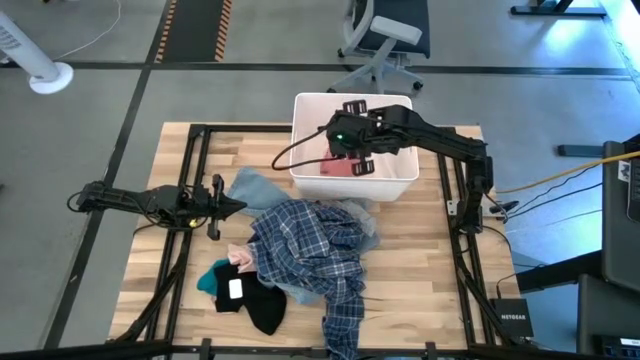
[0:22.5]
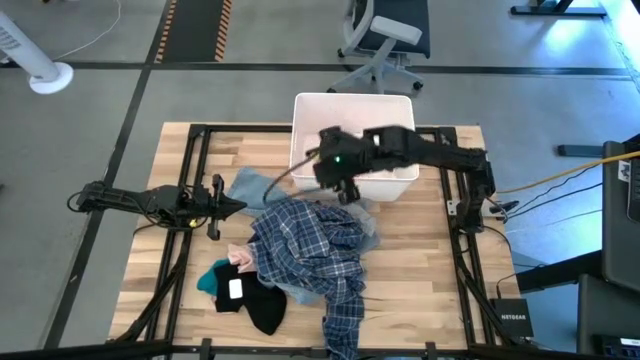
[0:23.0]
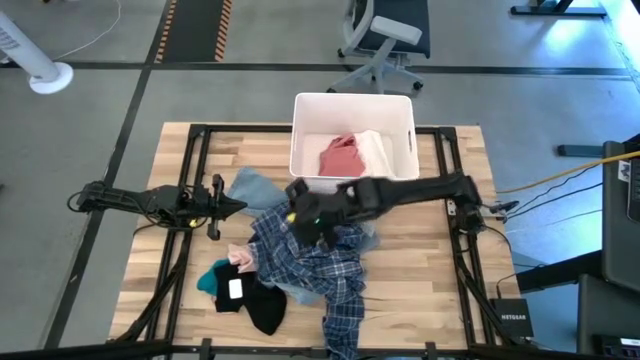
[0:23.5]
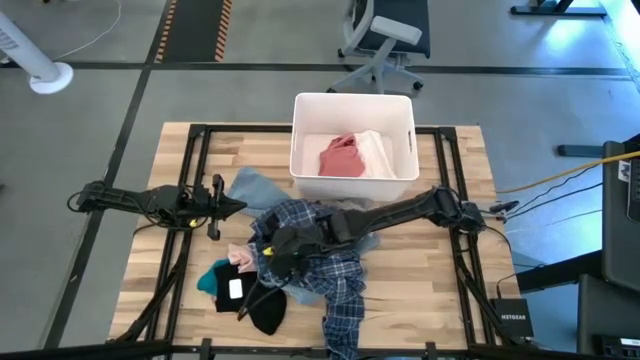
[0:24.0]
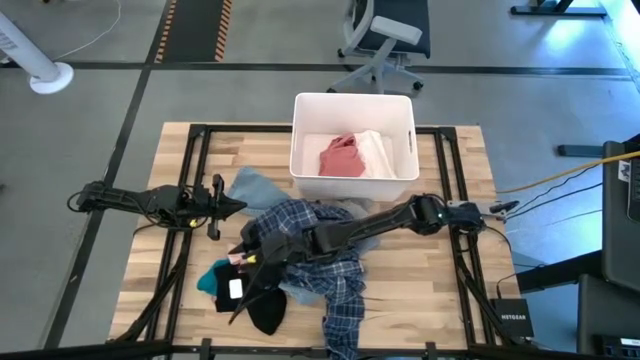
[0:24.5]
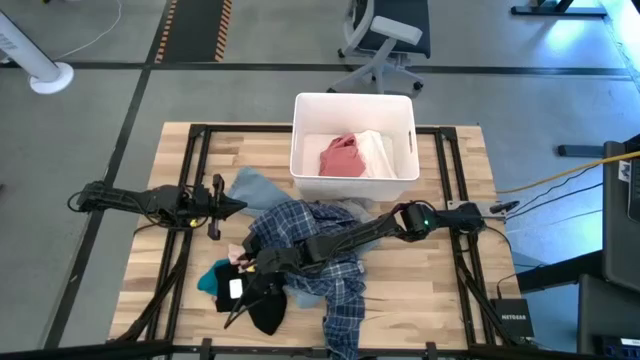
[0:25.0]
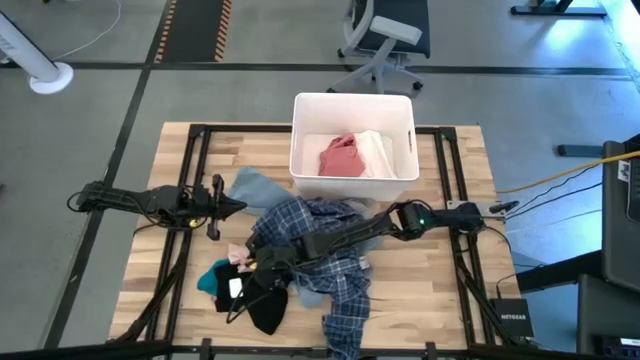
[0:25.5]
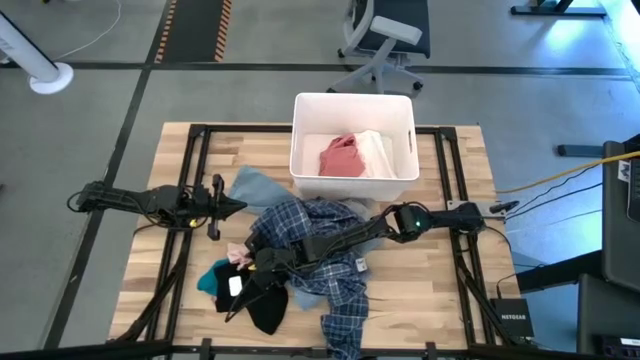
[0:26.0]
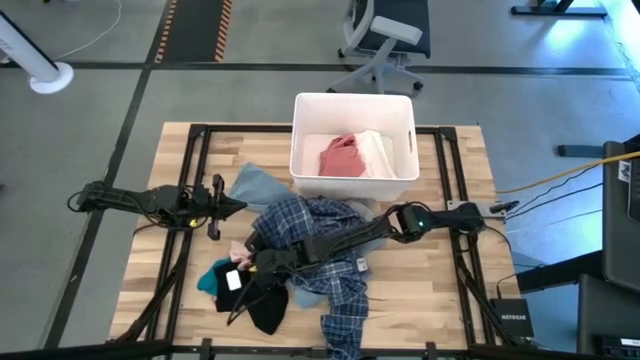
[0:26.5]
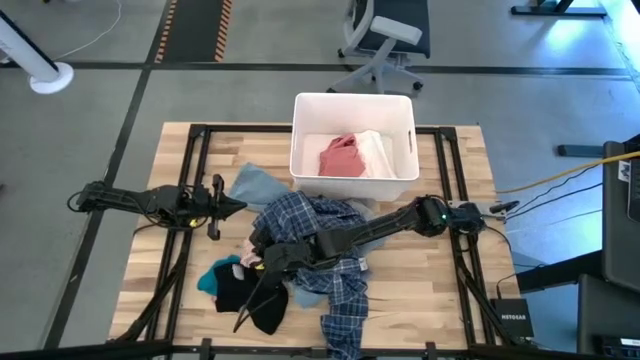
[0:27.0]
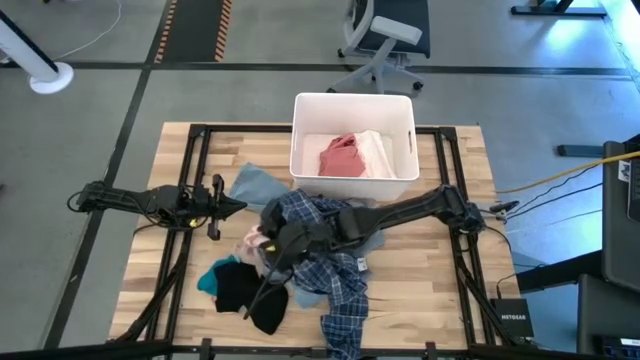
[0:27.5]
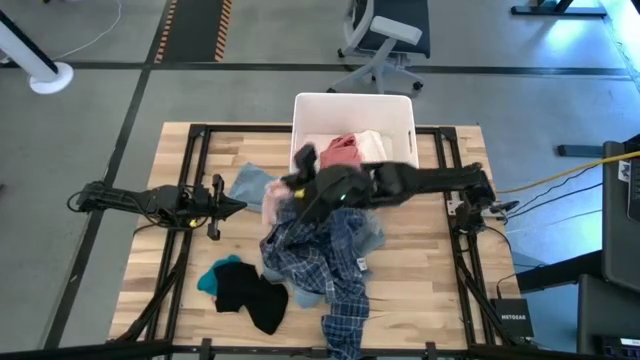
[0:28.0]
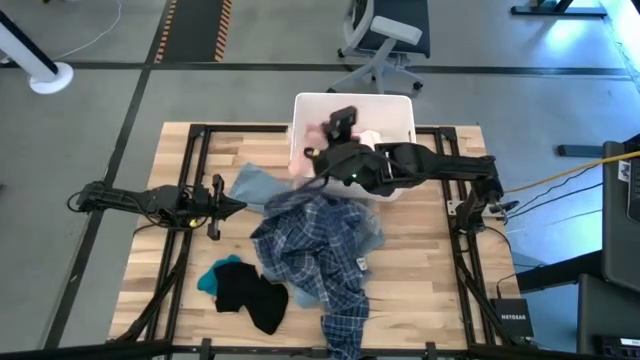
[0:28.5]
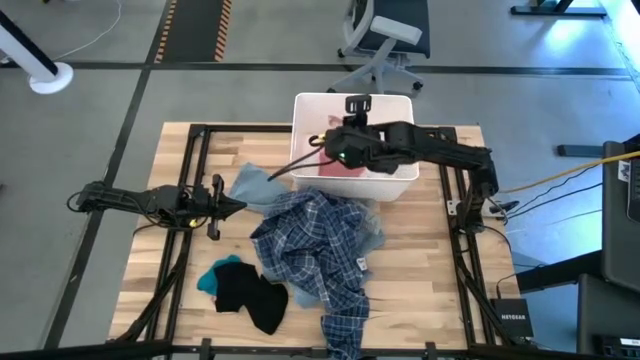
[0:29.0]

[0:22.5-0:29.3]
Task: Sort clothes
Put the light pink sock into the white laundry bin

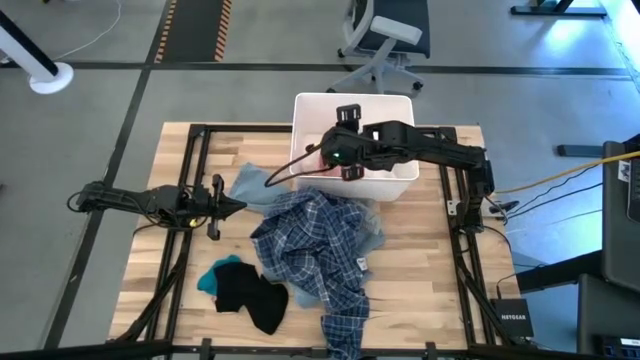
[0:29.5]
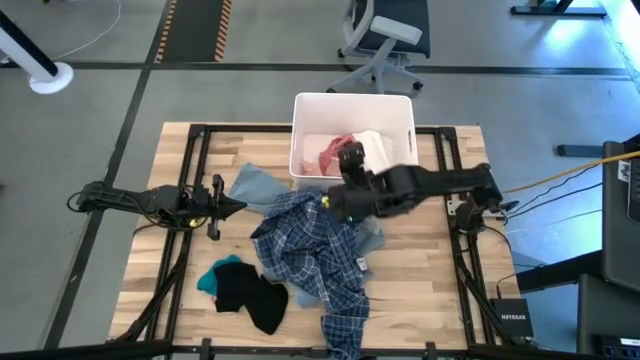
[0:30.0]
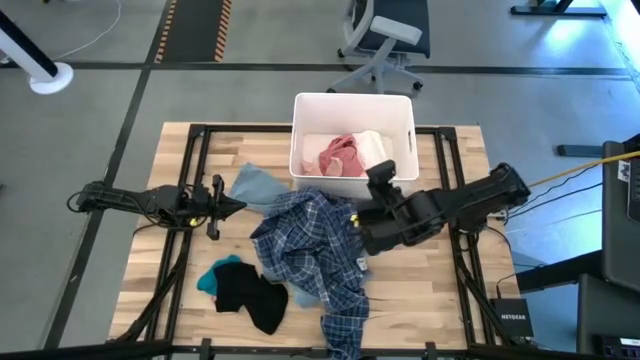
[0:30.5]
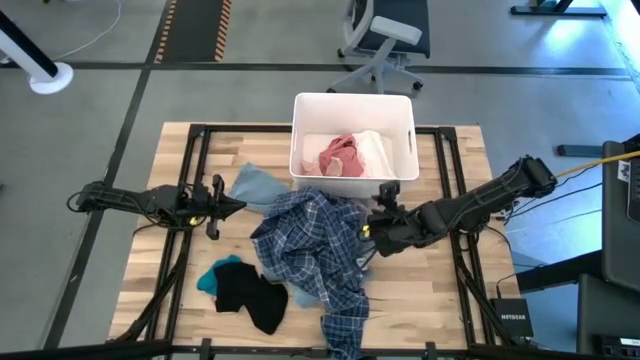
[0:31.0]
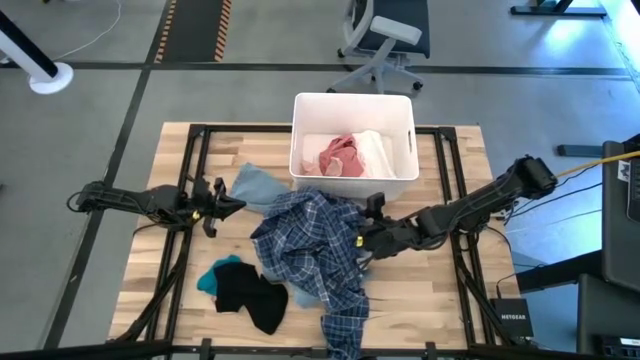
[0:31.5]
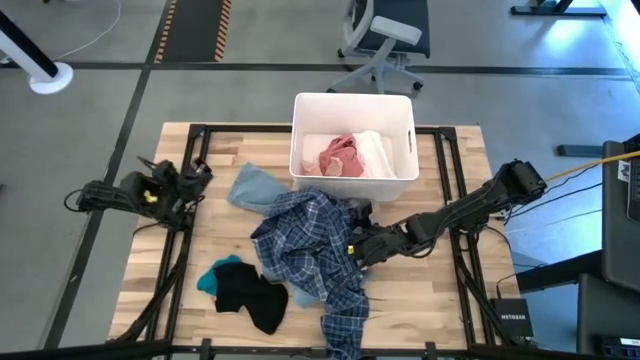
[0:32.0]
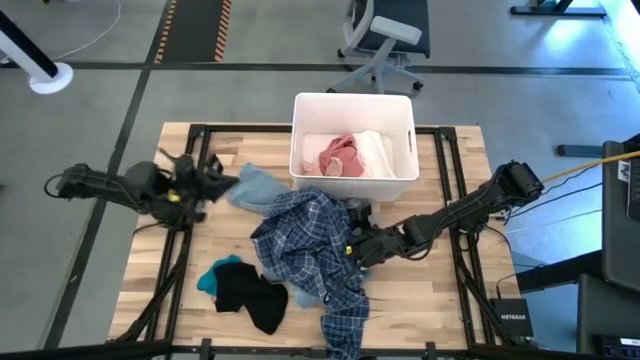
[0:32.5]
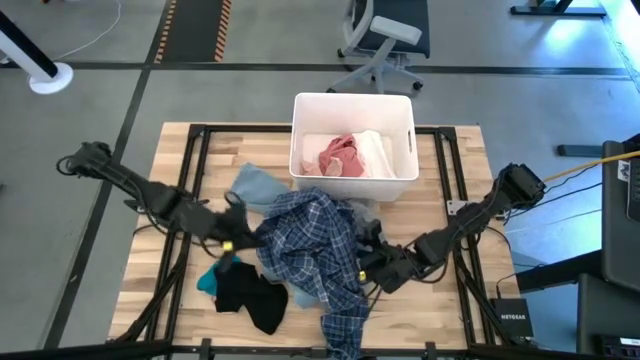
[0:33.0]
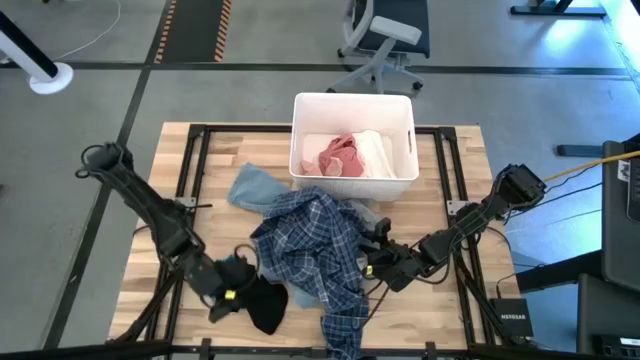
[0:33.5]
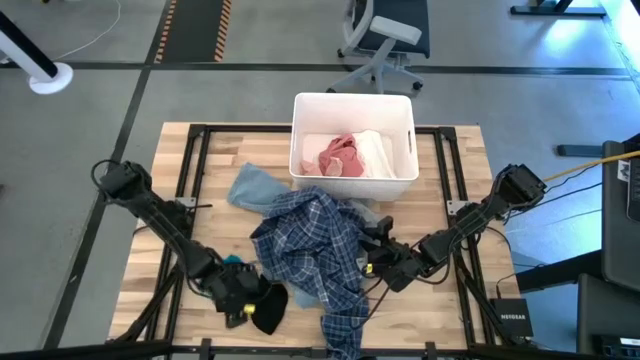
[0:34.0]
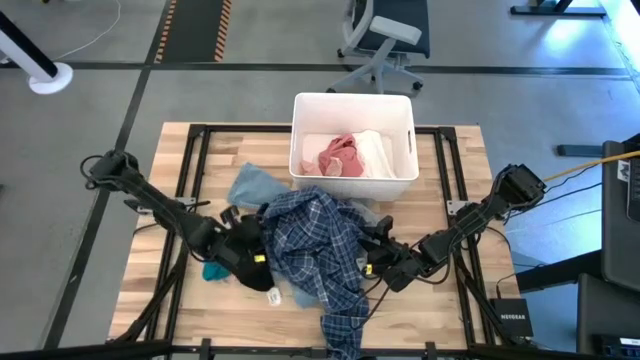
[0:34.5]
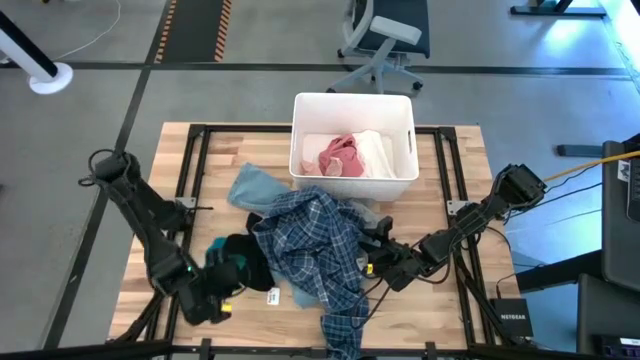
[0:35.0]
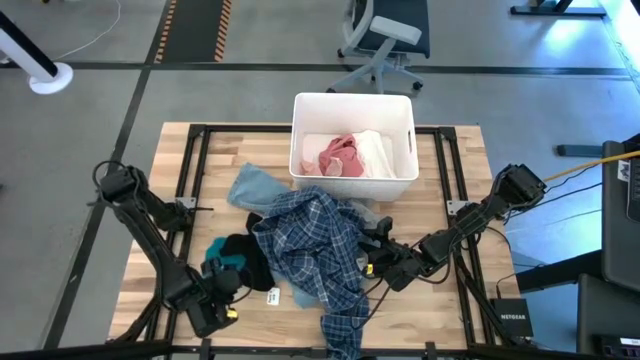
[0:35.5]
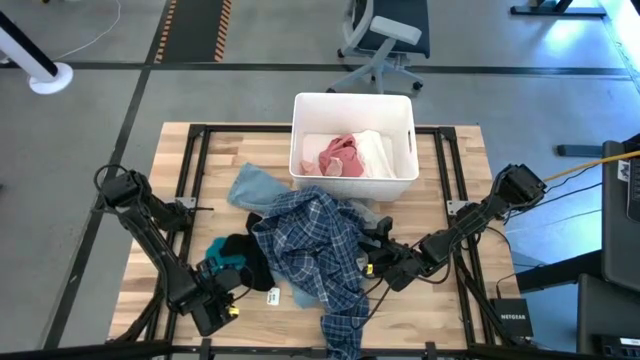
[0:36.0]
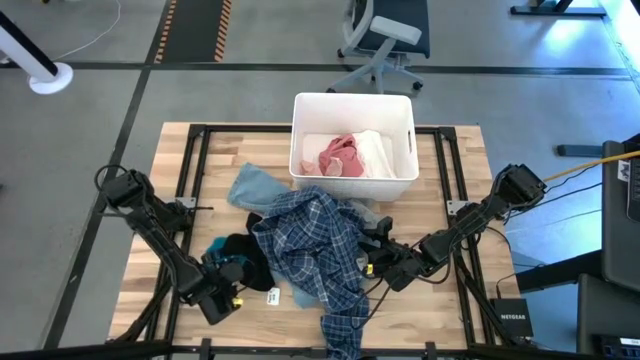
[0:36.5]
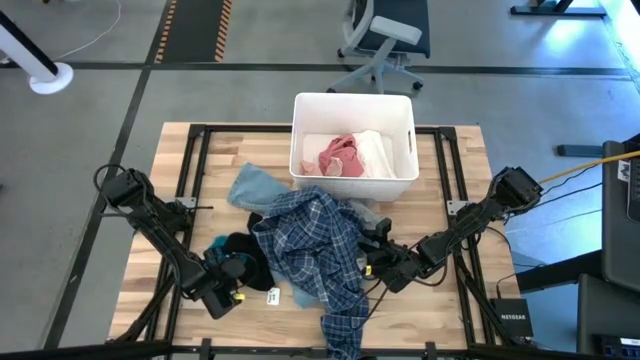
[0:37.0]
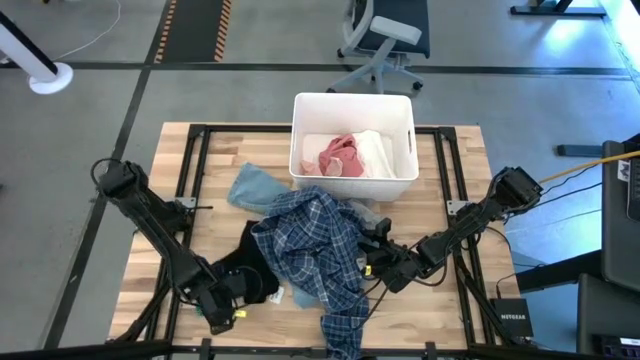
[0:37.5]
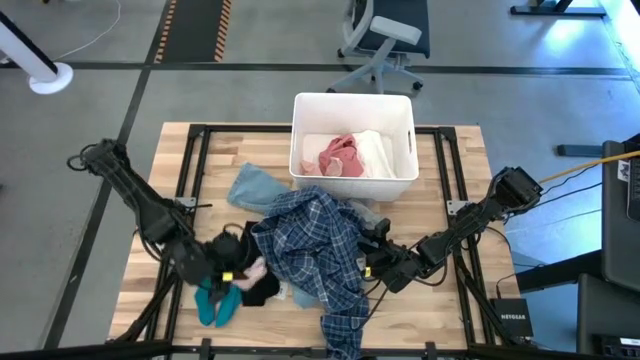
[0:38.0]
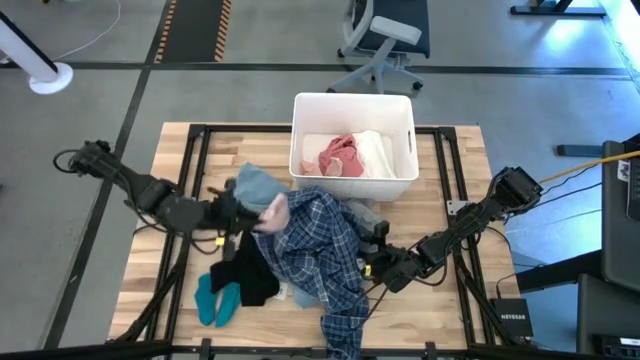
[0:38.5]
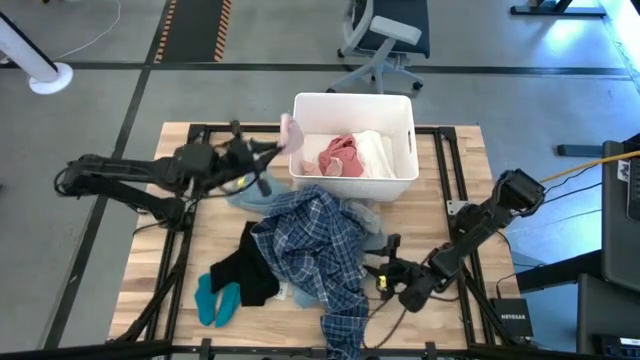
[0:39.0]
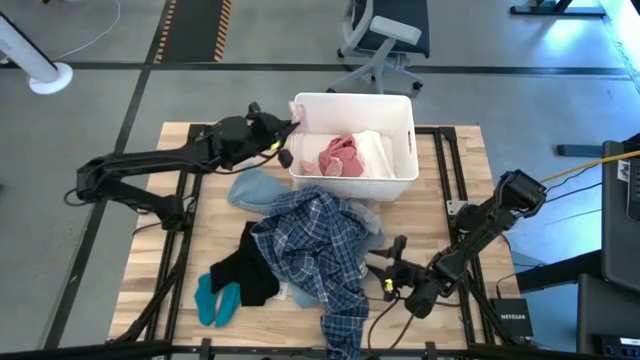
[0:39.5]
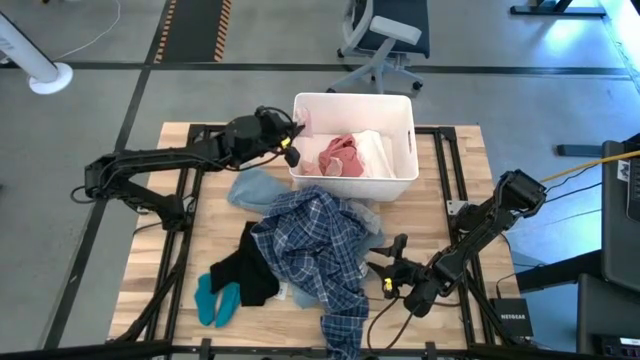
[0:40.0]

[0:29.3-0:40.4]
Put the light pink sock into the white laundry bin

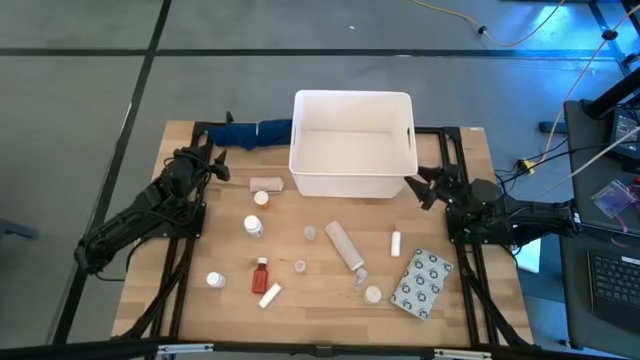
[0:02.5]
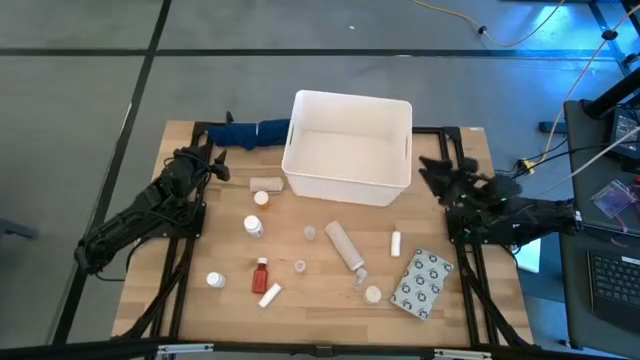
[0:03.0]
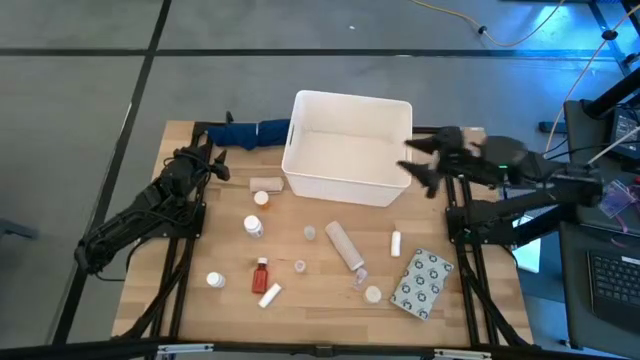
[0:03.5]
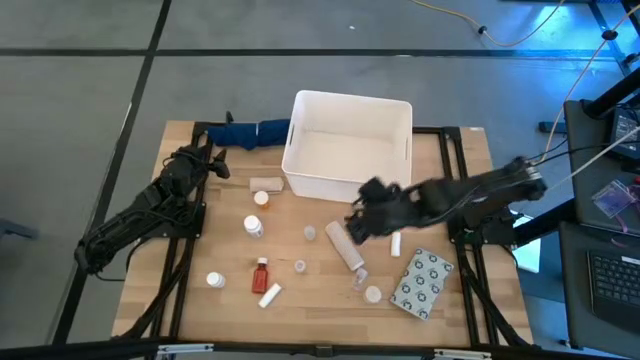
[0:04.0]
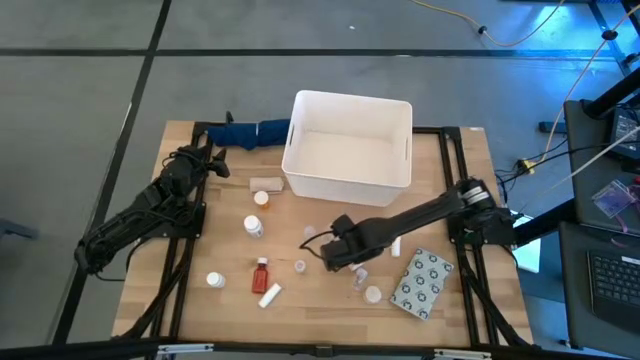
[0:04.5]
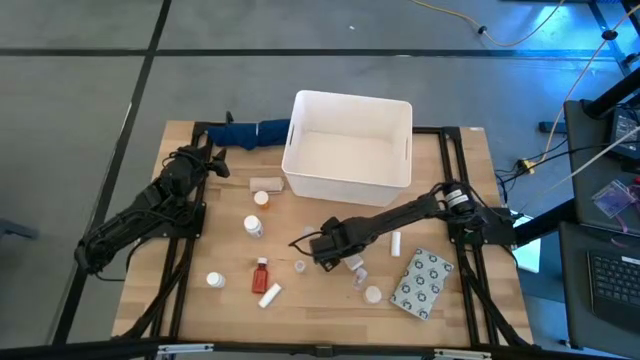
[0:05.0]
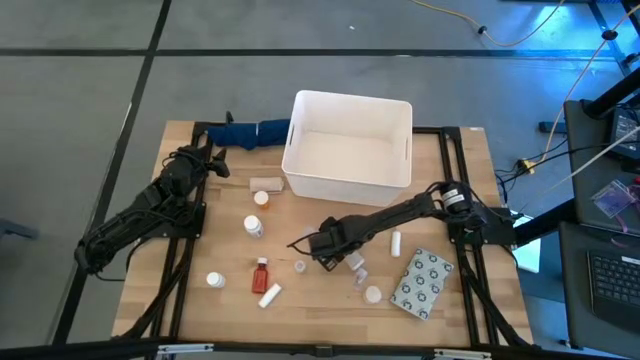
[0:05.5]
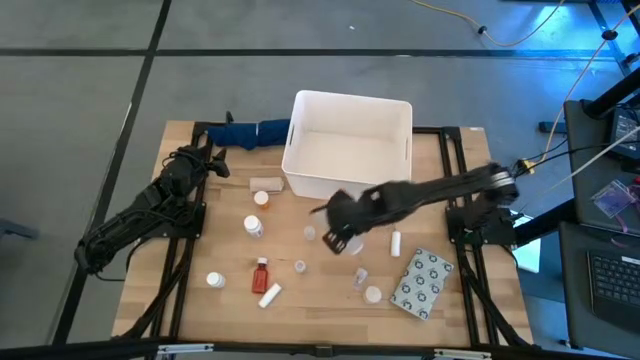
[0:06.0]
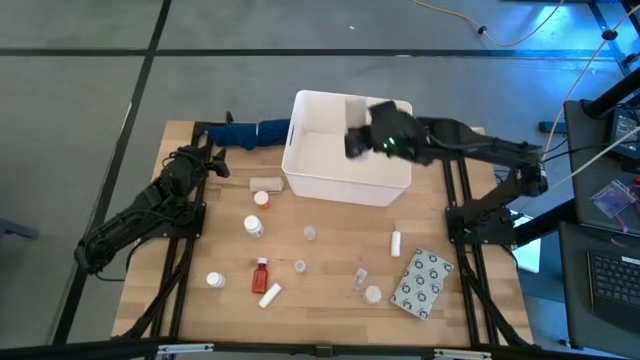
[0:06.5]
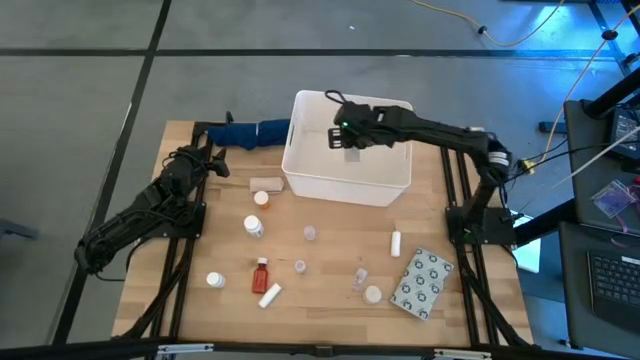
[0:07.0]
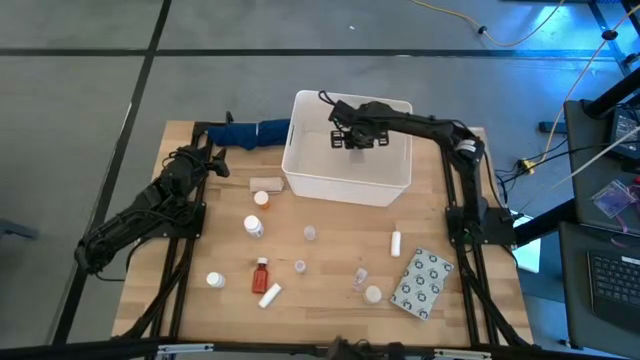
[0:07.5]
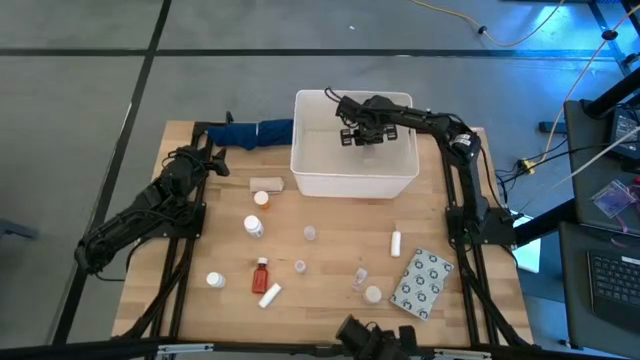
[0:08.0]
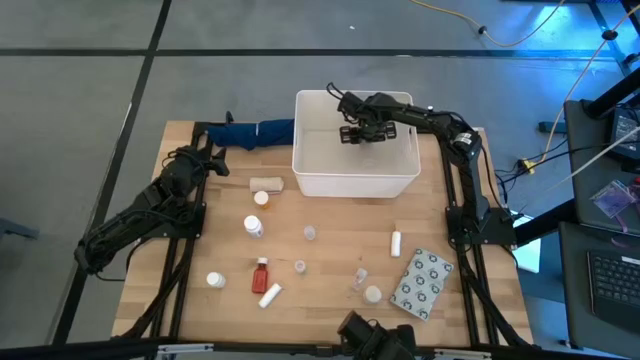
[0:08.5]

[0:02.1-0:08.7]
Task: Pick & place medical supplies in basket/bin
Put the bottom brown bandage into the white bin
